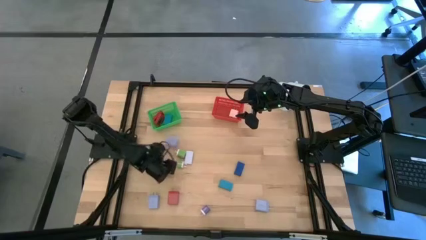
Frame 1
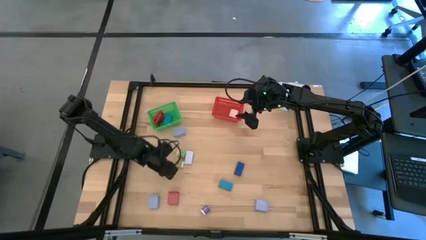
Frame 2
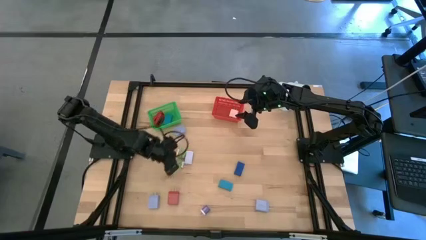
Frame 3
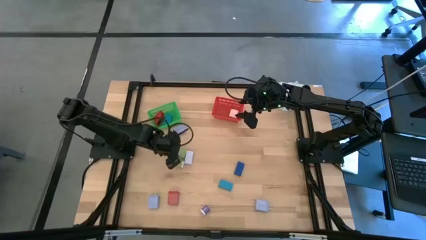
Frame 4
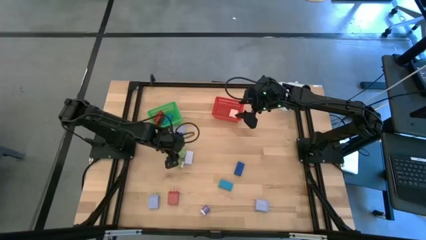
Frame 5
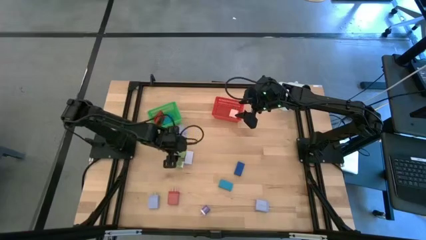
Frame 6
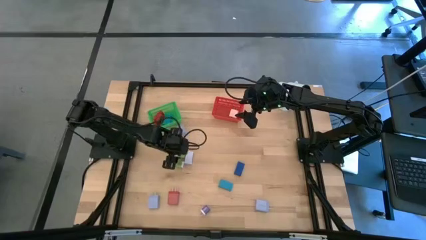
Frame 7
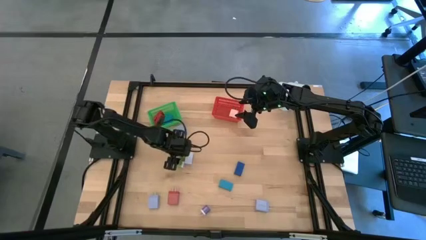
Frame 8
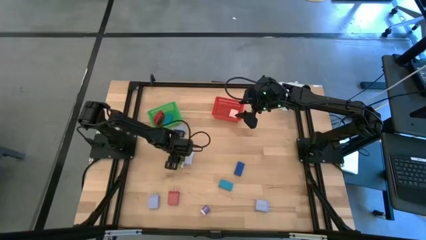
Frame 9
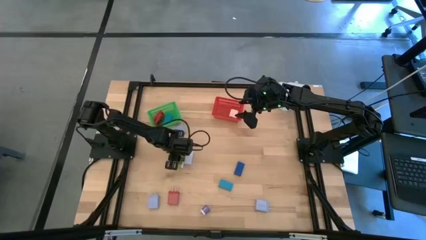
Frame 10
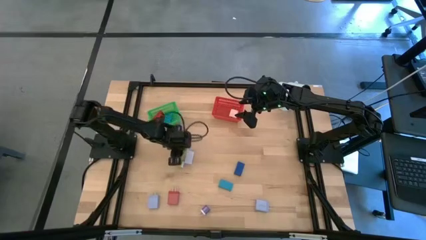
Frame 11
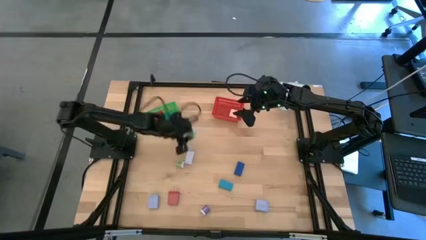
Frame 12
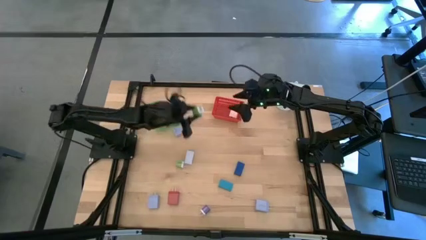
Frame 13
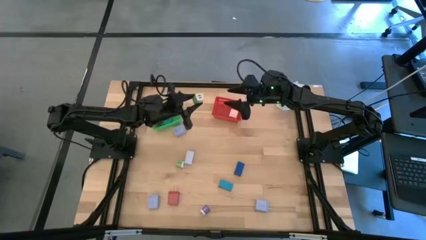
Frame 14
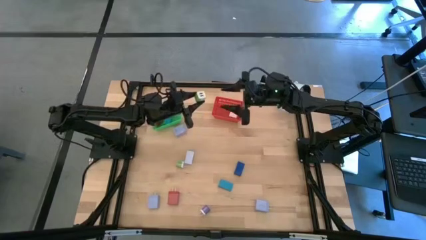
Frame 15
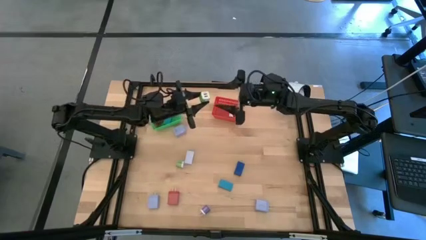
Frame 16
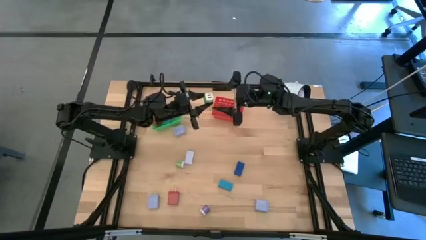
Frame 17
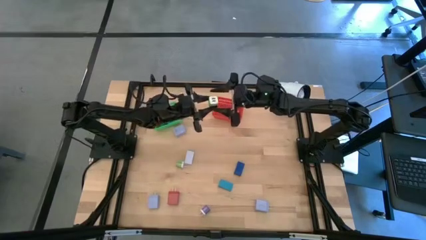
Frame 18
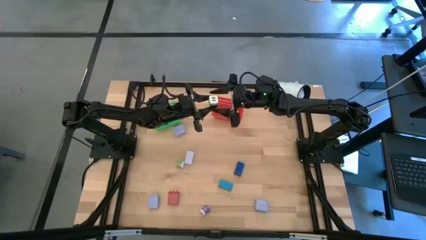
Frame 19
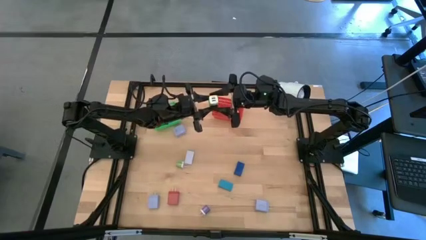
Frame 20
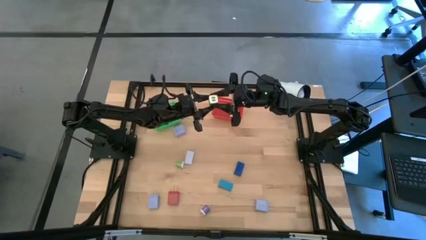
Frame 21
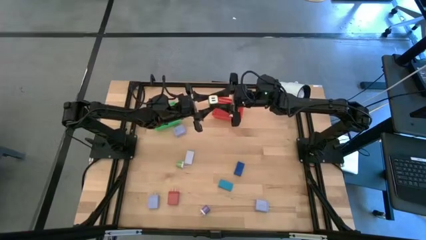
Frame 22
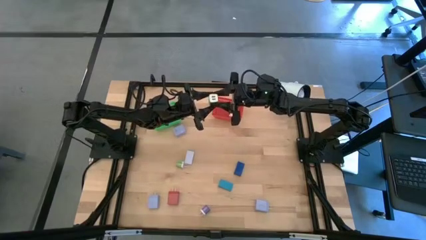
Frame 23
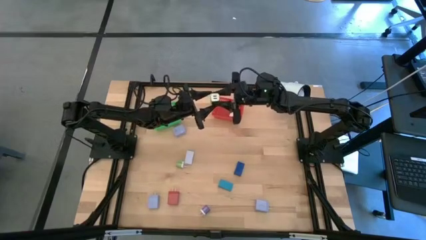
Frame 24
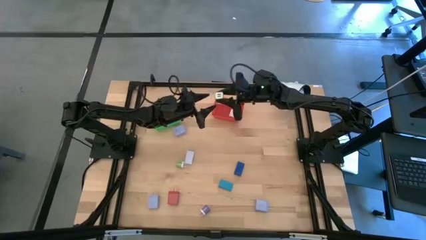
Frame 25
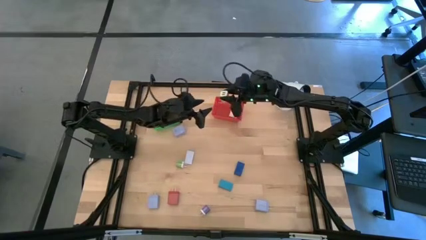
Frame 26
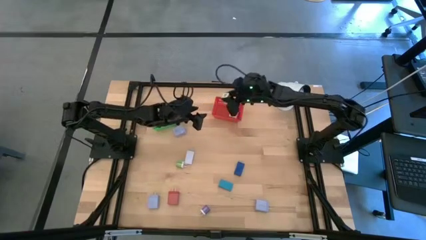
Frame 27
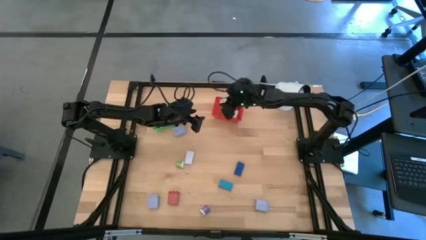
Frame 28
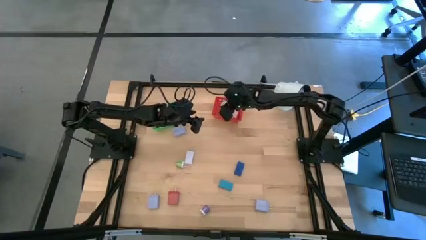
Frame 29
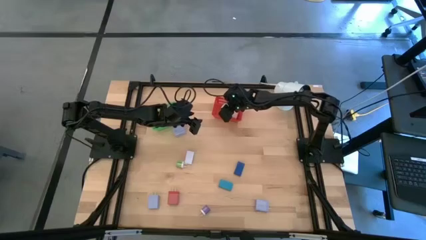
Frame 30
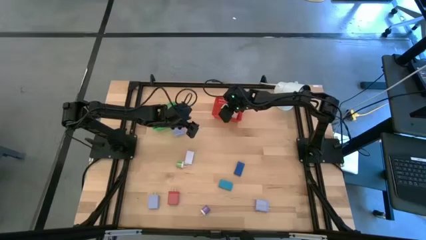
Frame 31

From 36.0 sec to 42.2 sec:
Task: Pick & Place Office items
Put the top green charger adapter into the red bin

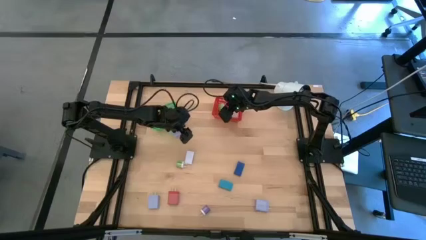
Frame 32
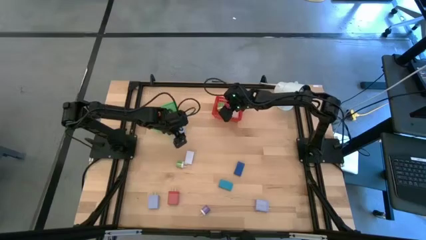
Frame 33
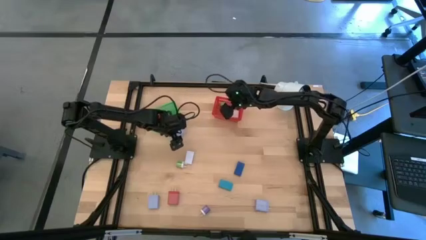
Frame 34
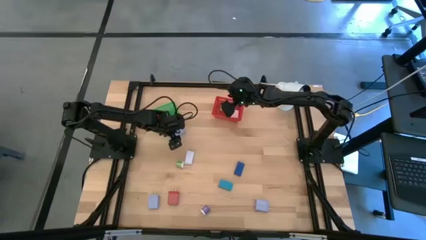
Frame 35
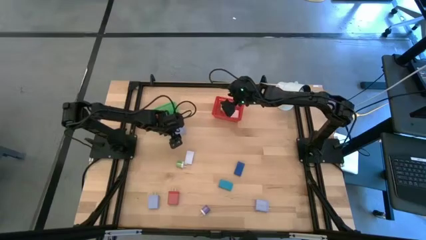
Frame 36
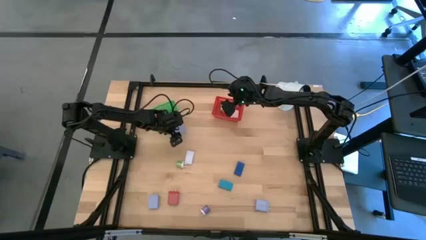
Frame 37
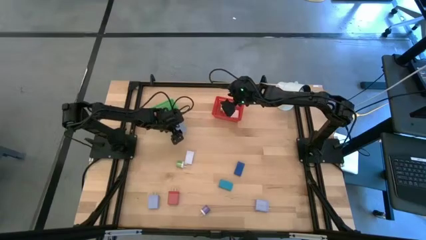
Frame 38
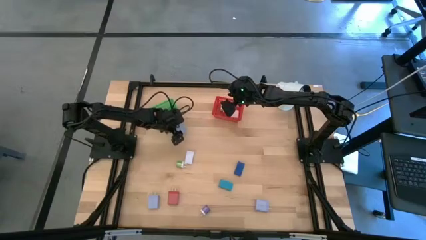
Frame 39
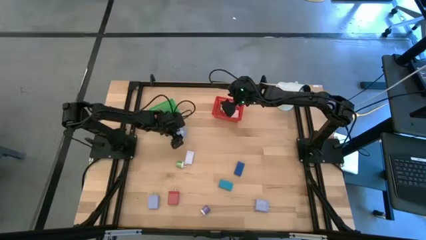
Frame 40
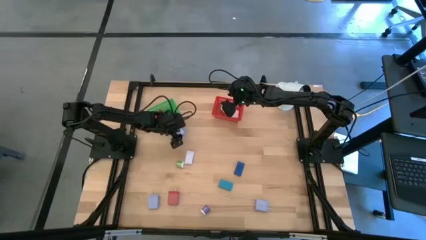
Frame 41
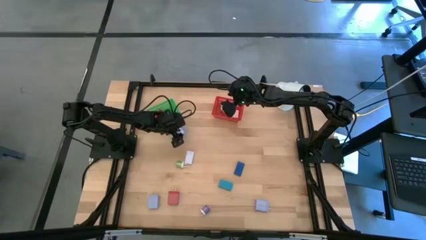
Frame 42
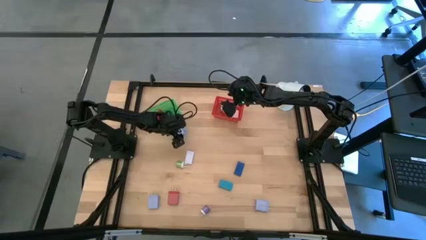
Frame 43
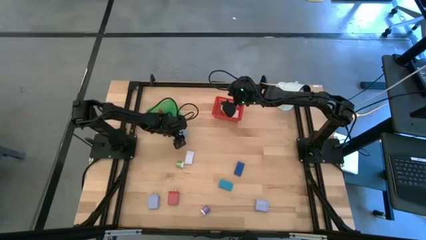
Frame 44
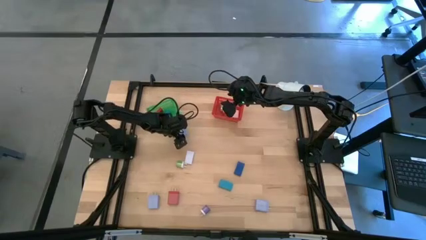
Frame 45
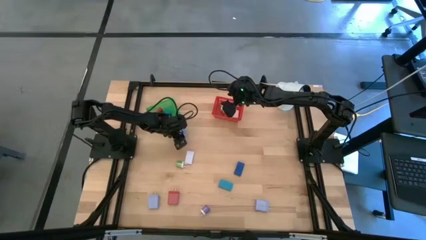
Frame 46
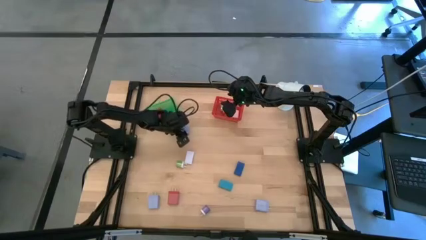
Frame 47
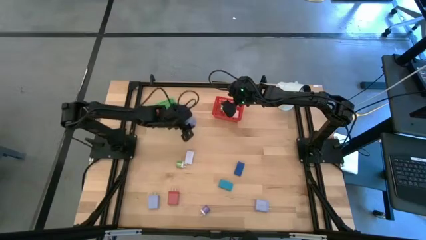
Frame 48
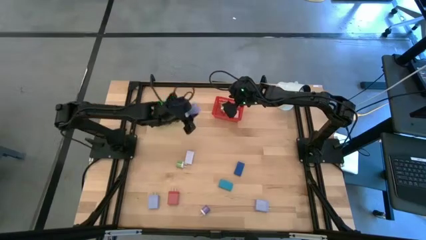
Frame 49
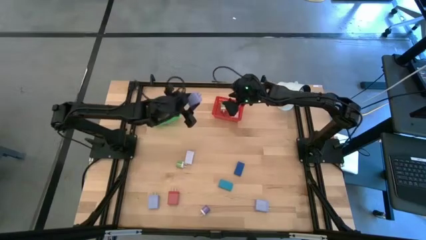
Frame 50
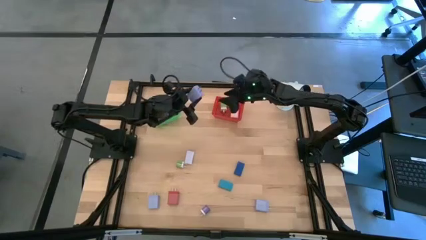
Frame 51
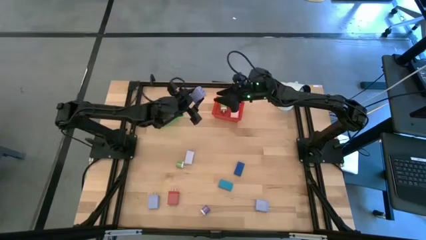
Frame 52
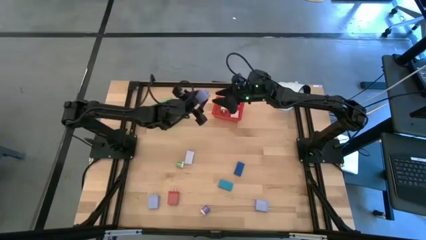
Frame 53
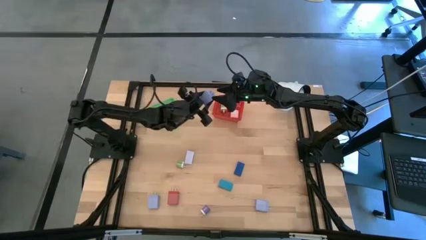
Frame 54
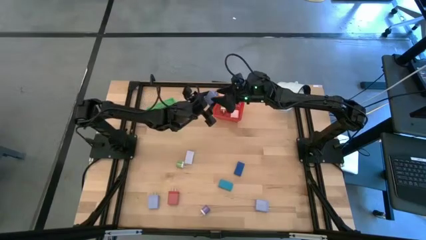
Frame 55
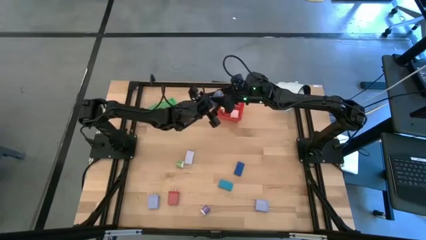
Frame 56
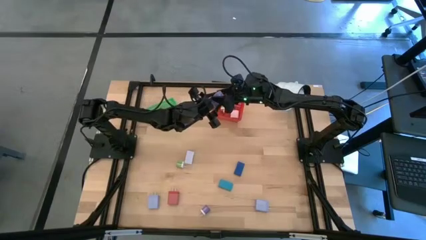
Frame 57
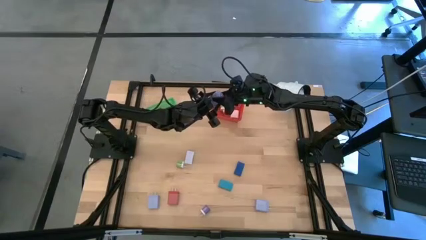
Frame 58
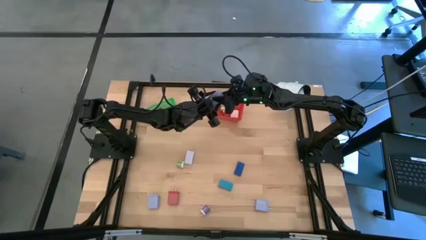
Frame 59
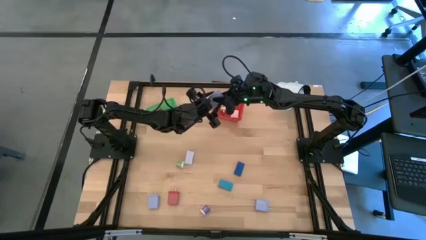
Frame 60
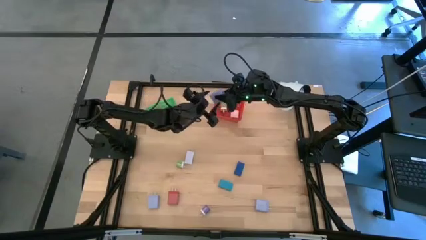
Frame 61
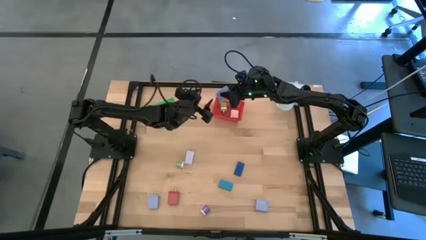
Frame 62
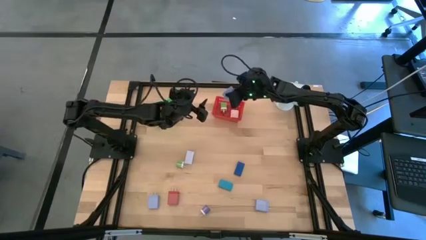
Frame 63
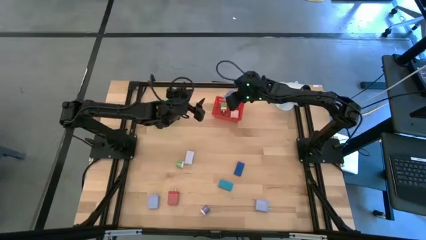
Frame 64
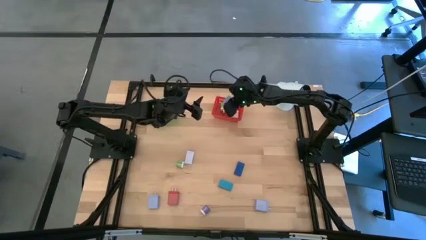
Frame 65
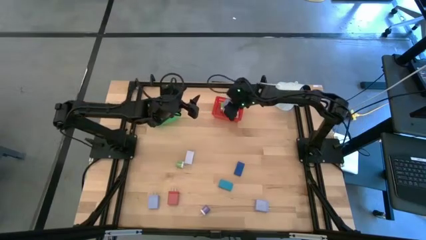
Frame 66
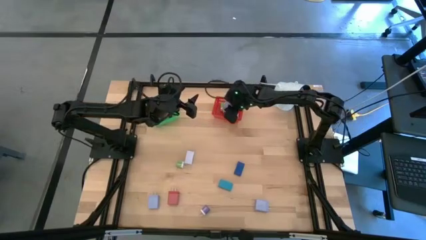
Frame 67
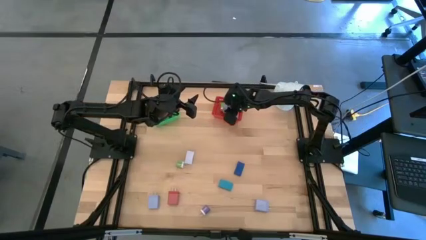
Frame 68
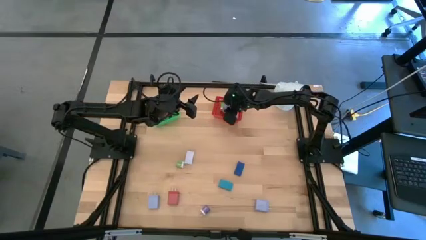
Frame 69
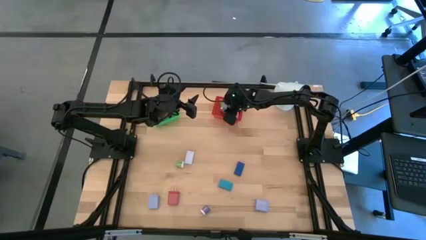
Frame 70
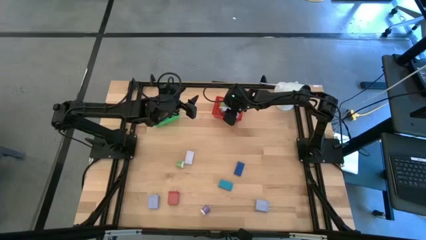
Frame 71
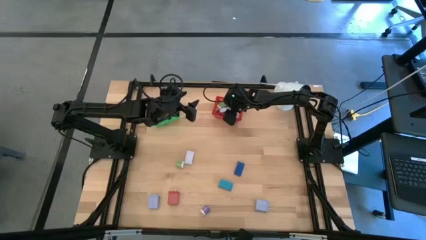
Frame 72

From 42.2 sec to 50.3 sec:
Put the top left purple charger adapter into the red bin
